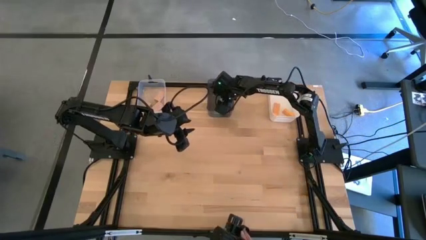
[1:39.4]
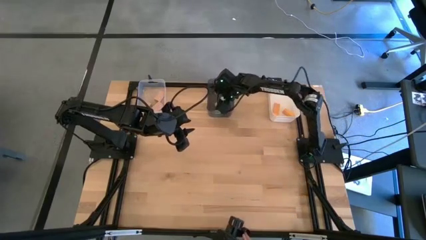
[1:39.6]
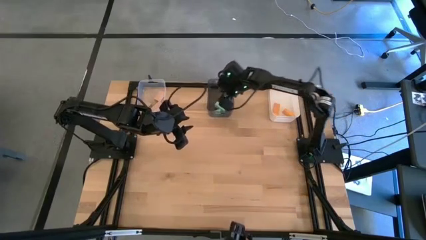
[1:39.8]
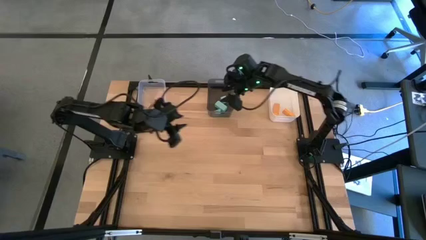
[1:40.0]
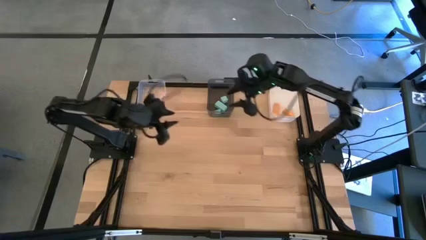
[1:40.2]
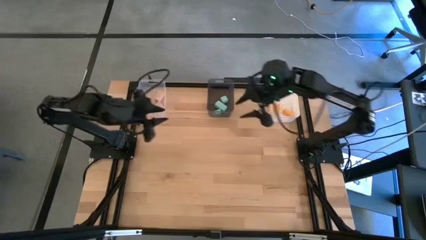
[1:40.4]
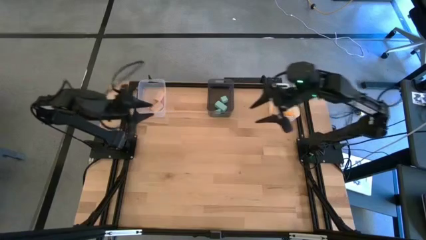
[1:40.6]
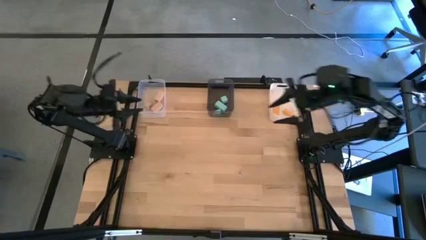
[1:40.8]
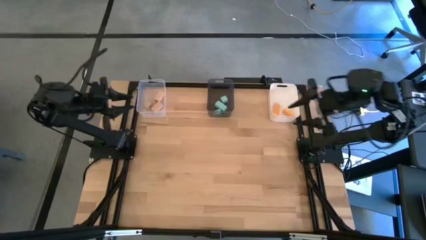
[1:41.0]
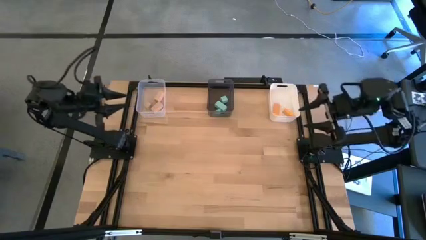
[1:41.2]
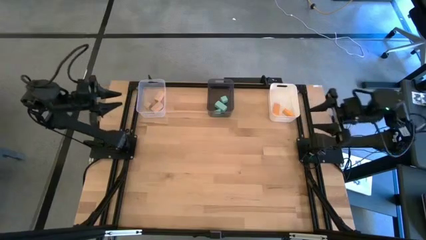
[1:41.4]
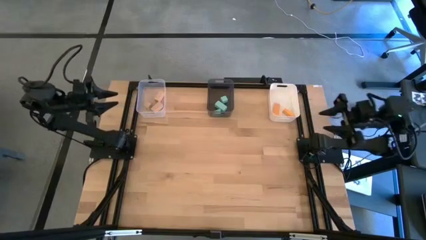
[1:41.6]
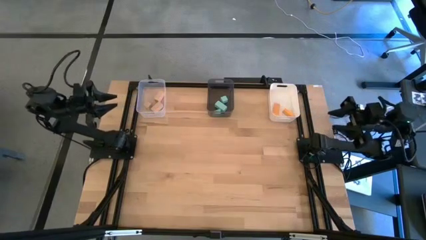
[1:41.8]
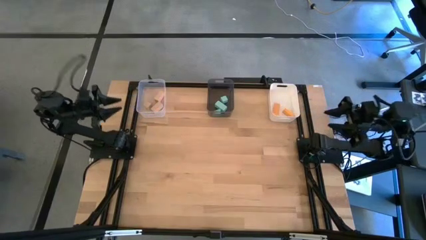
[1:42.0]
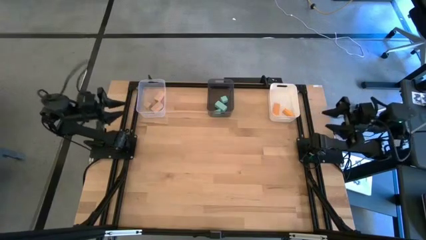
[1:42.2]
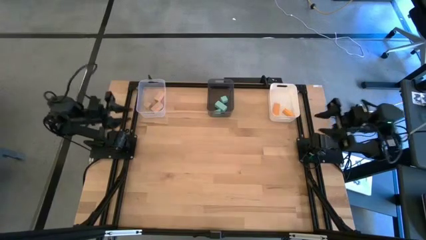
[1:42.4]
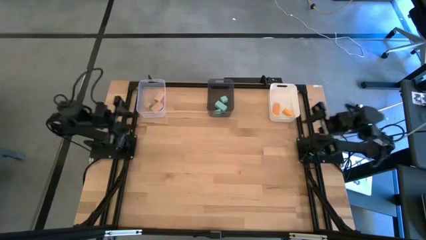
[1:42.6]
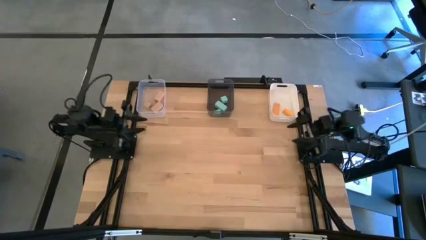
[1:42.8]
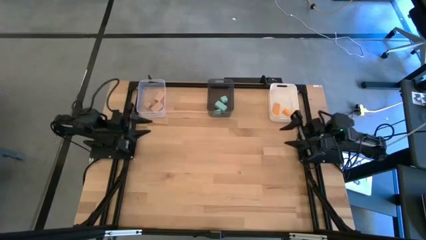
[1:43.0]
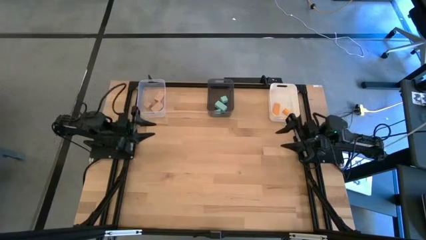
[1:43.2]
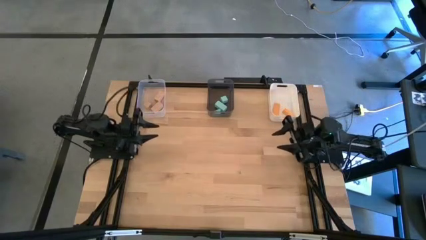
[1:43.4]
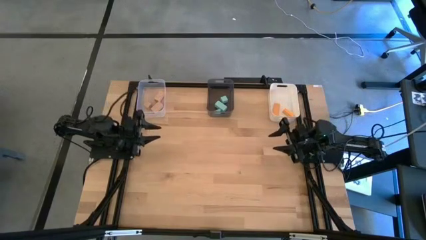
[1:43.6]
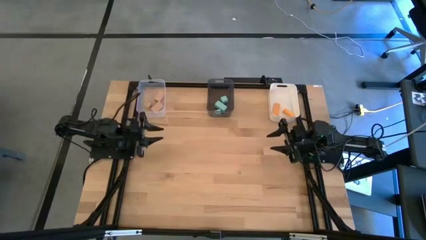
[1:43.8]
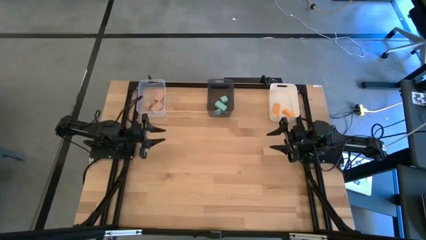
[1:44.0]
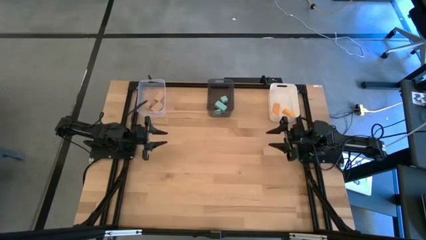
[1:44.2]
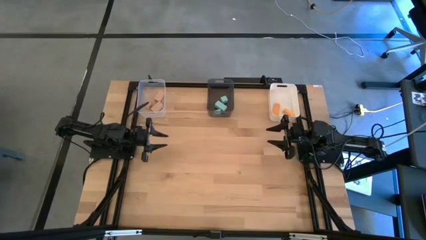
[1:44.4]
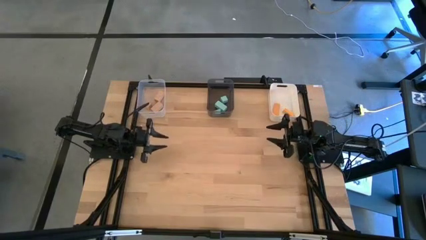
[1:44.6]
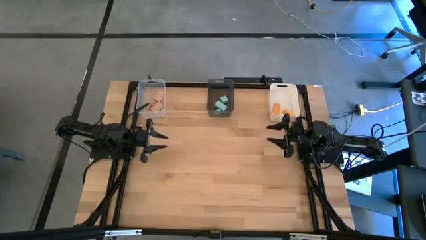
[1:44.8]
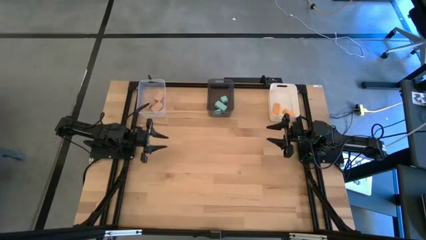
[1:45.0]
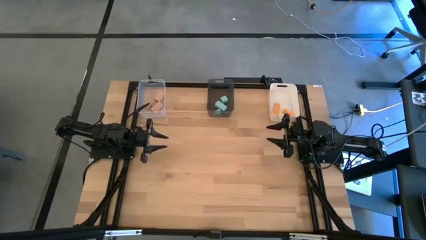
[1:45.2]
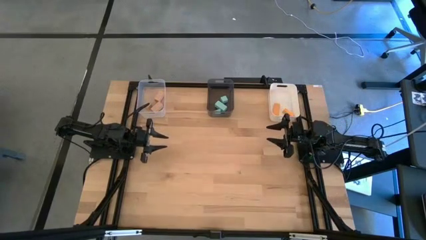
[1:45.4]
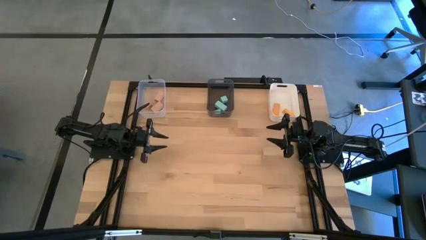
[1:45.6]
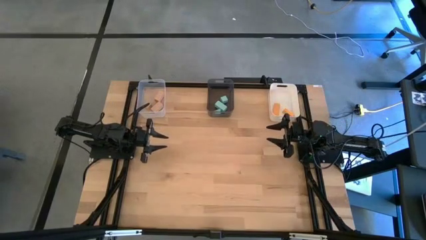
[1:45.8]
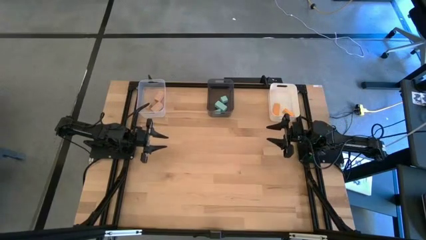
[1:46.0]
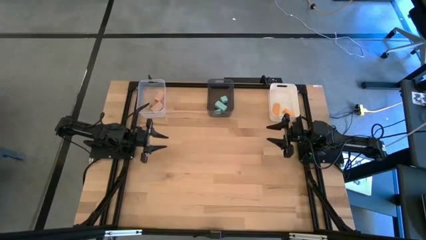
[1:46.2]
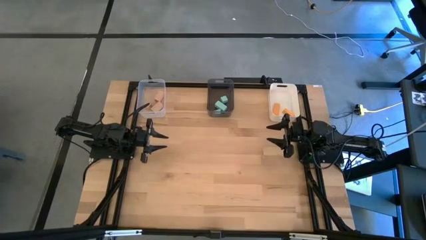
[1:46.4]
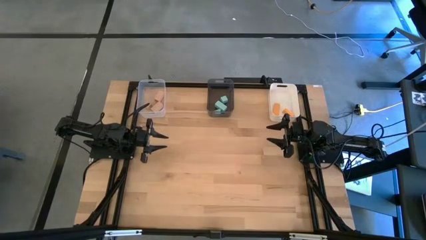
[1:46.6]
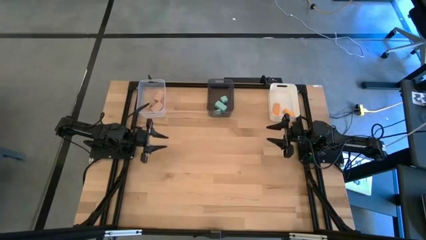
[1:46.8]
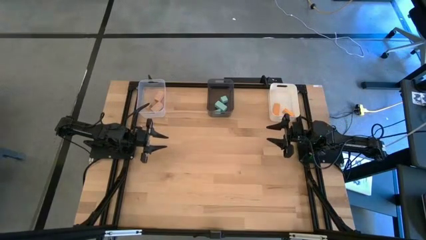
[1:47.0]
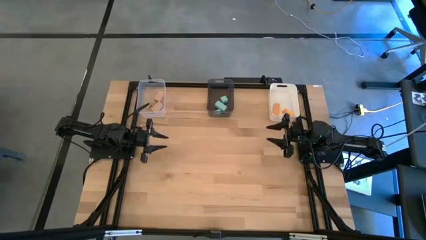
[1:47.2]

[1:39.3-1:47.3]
Task: Sort & place blocks by color
Return to Home Position
